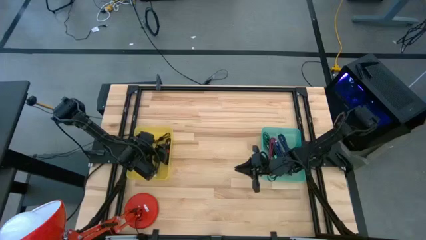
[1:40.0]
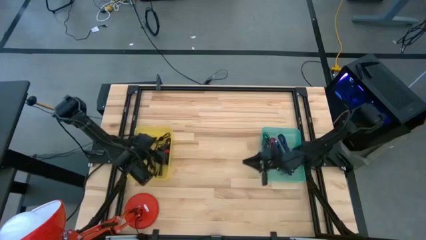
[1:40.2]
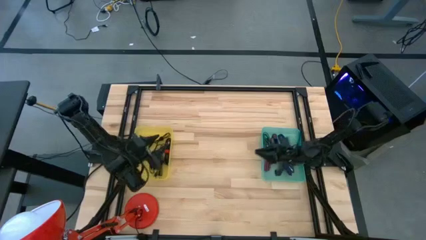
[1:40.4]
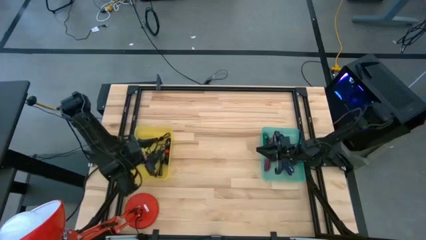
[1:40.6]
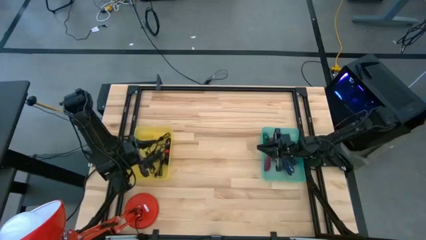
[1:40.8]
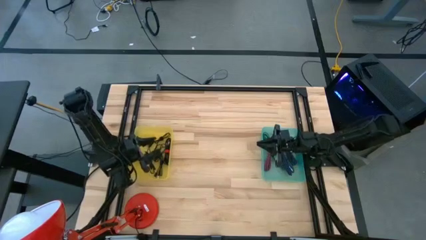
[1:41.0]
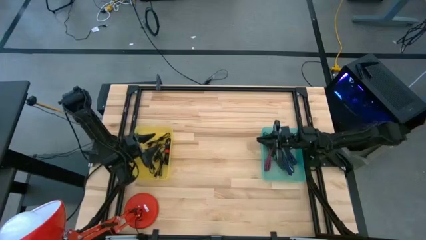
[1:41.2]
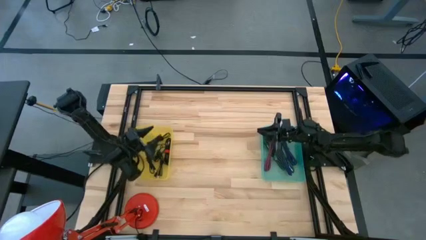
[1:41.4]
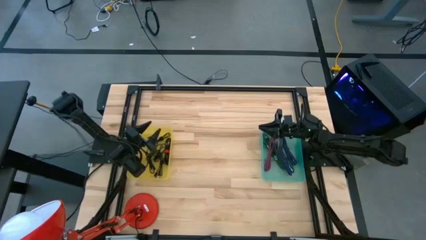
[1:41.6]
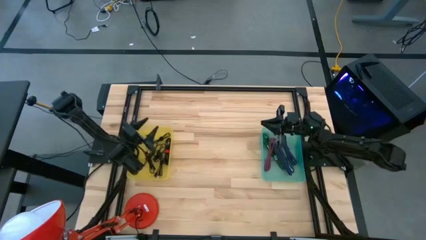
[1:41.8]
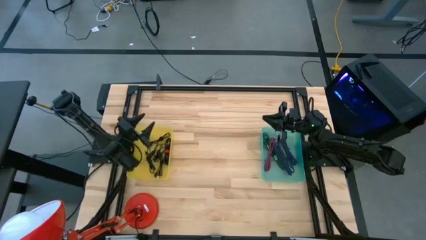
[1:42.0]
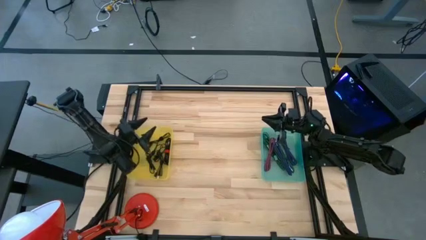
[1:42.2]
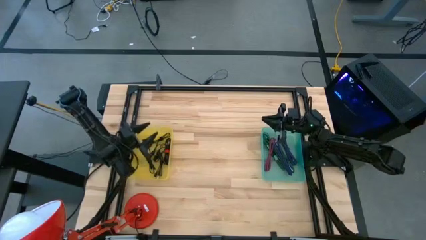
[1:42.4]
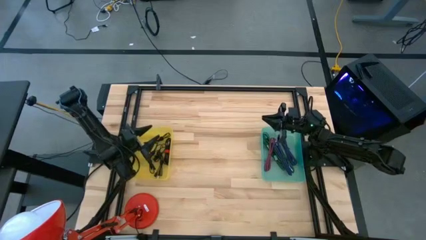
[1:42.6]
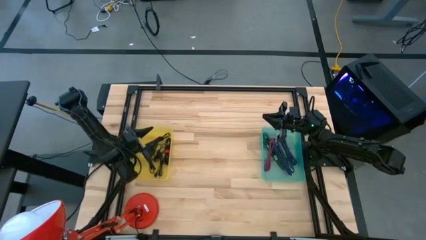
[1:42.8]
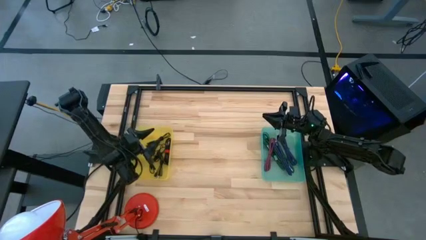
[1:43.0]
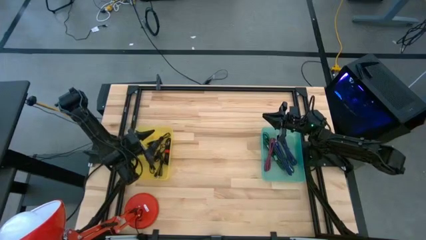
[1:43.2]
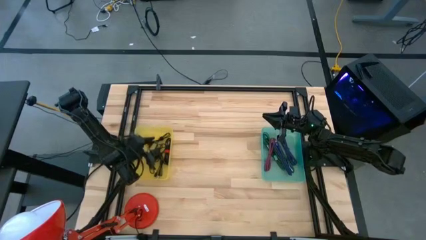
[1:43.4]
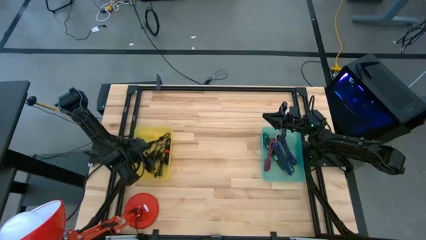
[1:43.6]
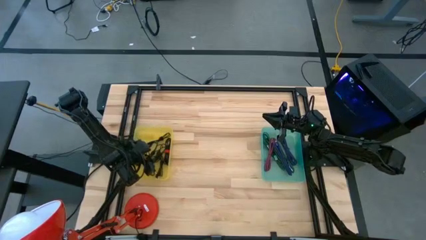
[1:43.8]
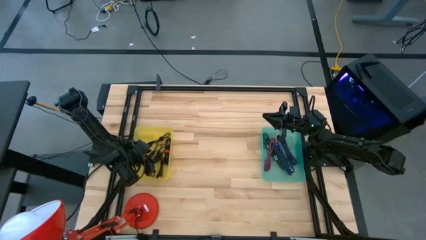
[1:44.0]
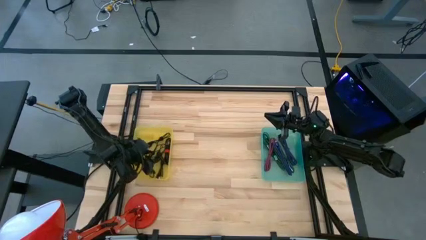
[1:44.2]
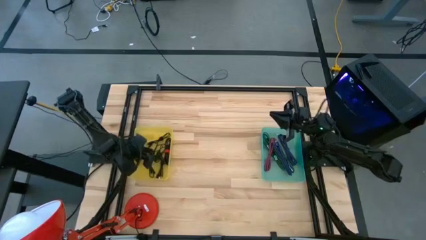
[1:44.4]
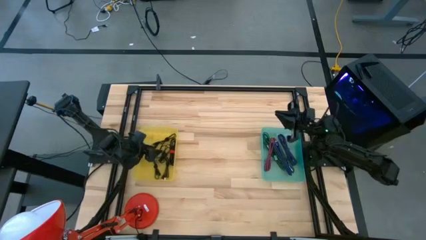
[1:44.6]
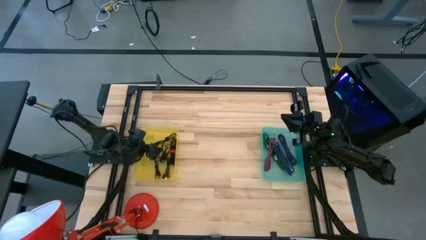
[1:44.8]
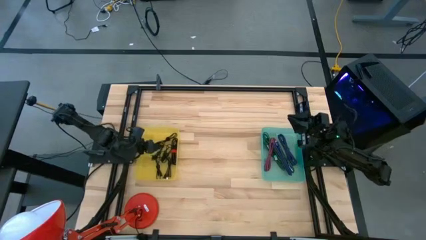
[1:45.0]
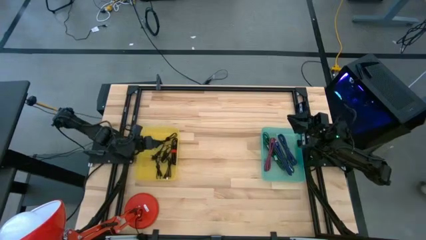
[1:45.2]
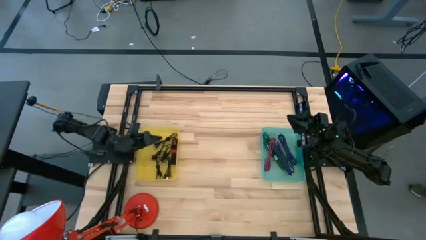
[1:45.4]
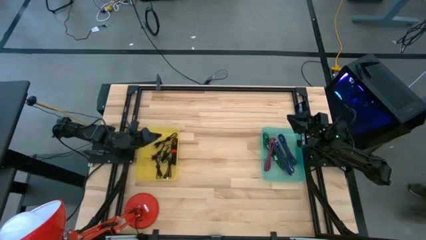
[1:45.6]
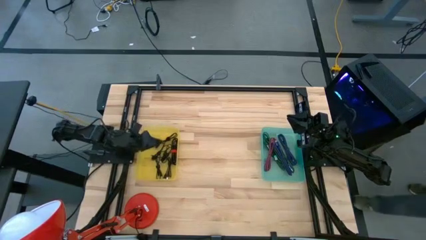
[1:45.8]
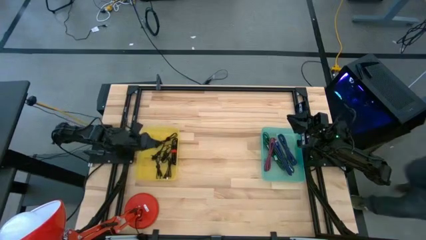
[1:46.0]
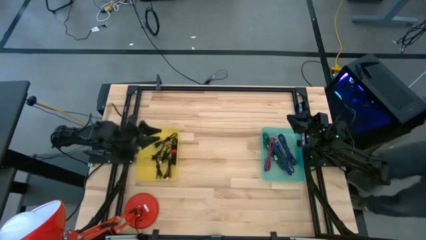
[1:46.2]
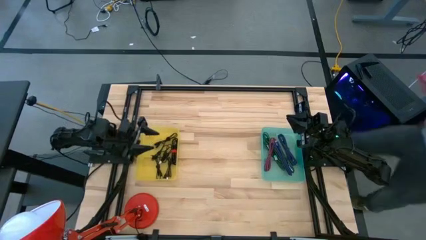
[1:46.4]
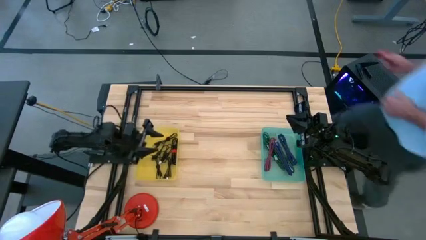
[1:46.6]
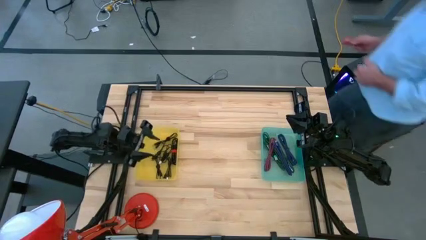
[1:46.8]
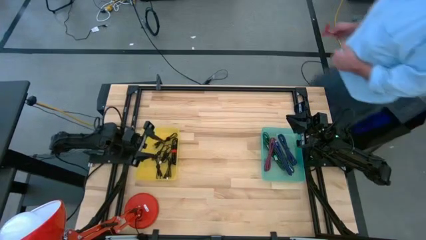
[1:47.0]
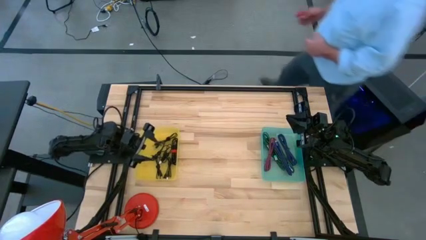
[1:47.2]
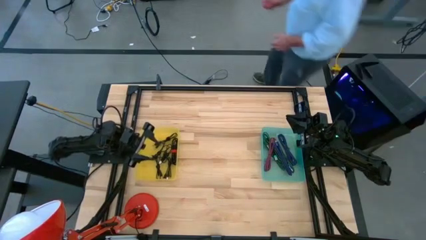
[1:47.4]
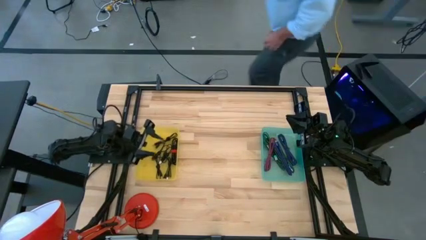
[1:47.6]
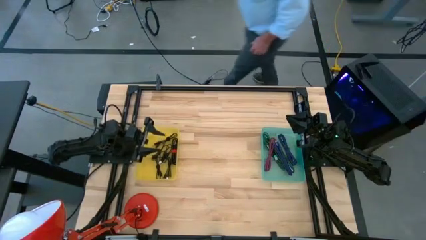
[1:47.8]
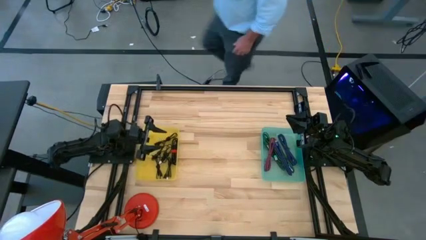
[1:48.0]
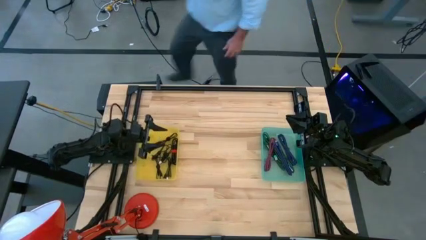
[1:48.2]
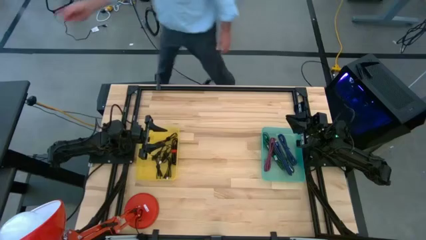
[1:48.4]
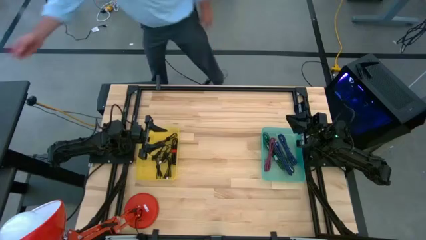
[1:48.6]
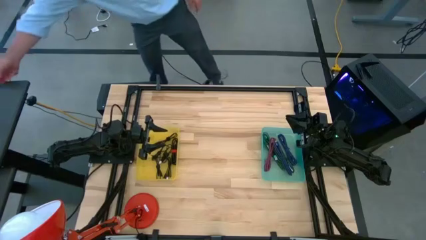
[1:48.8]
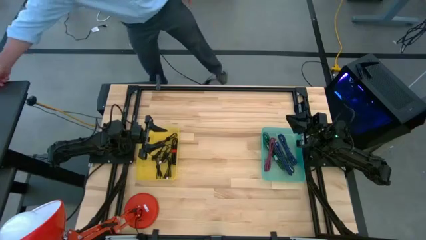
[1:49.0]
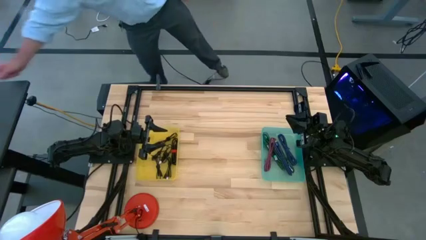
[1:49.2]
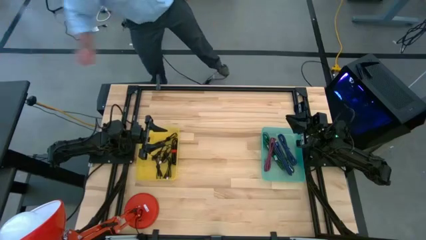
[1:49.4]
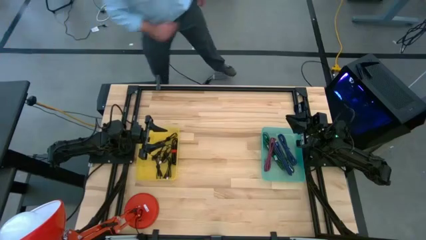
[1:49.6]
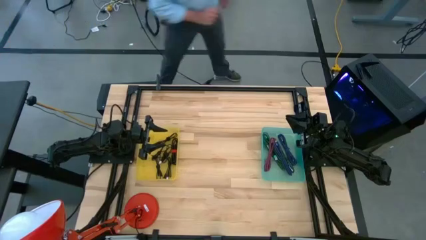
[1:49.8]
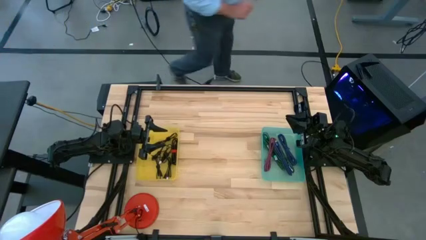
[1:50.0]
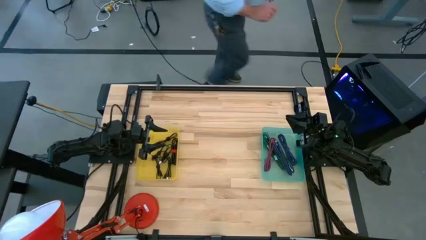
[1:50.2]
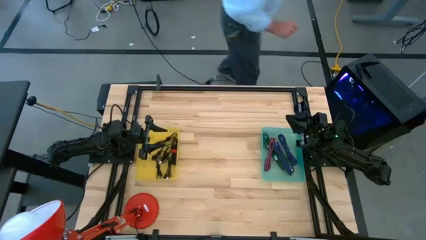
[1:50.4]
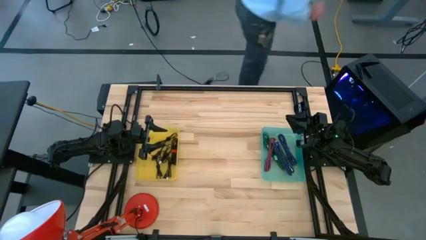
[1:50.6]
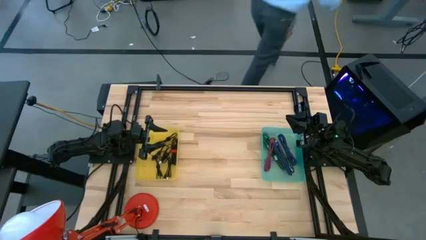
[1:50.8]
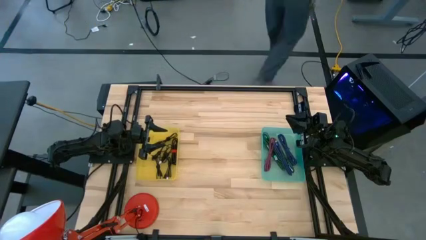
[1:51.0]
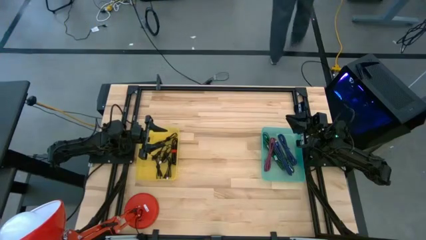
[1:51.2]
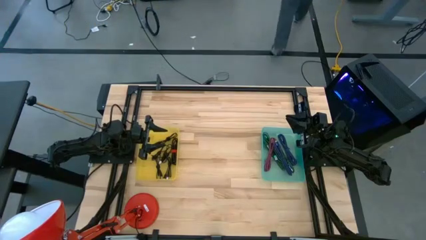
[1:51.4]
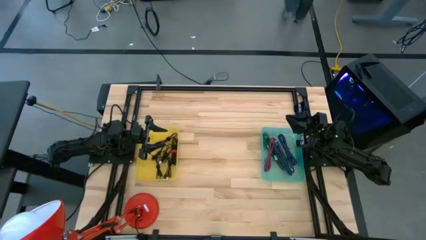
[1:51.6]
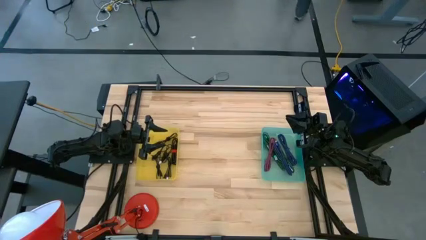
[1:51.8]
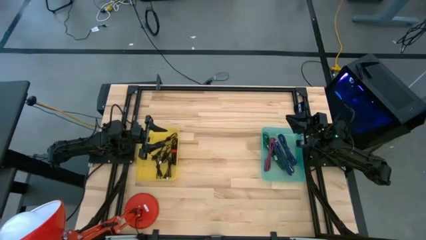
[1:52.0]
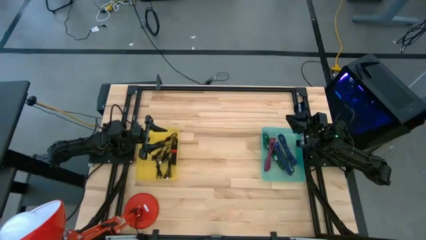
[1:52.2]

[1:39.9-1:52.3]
Task: Pick & Place USB Port
Return to Home Position

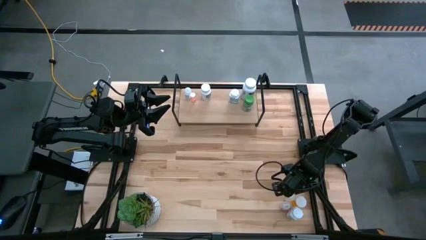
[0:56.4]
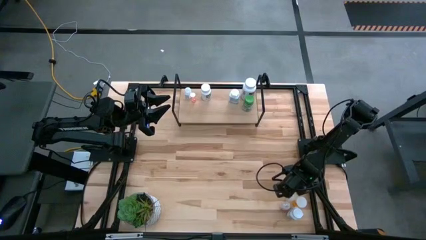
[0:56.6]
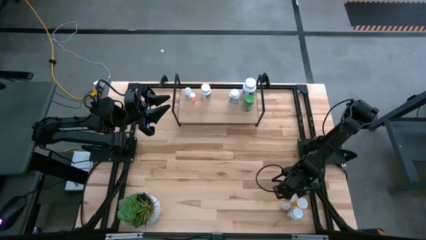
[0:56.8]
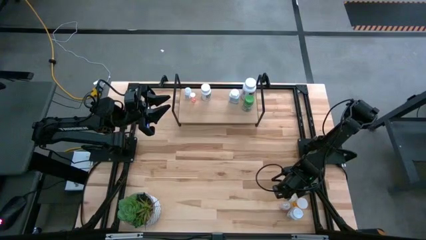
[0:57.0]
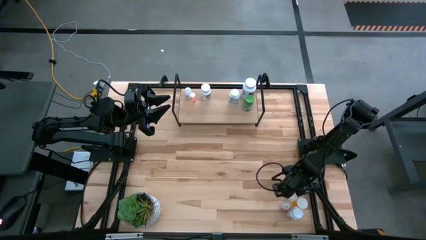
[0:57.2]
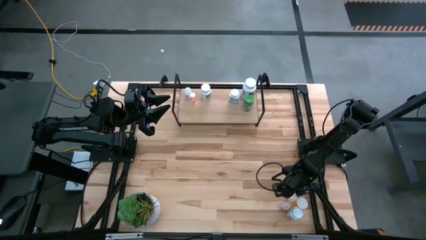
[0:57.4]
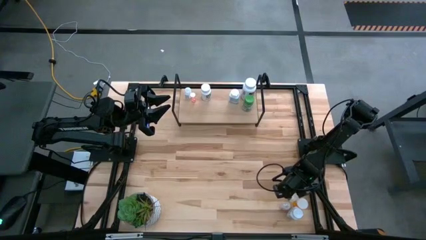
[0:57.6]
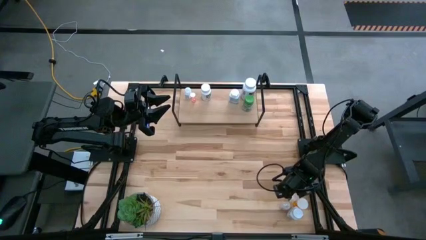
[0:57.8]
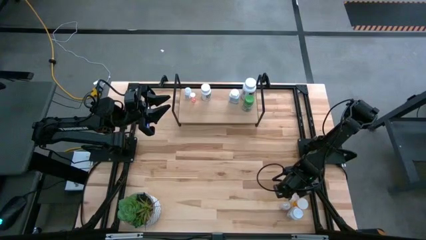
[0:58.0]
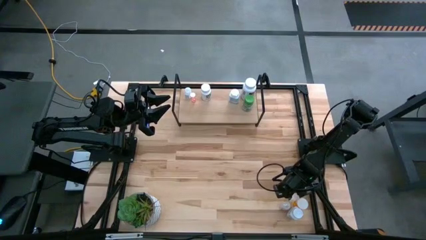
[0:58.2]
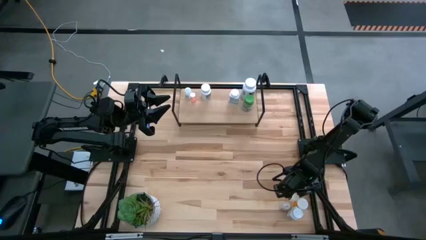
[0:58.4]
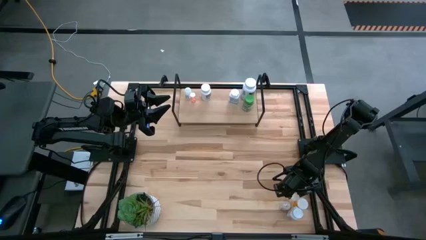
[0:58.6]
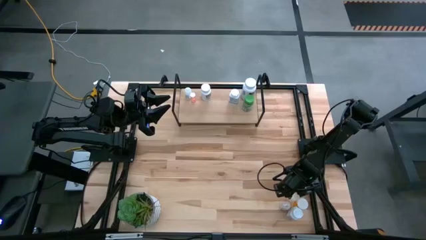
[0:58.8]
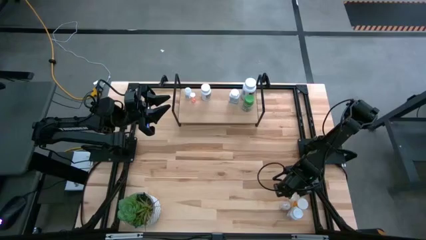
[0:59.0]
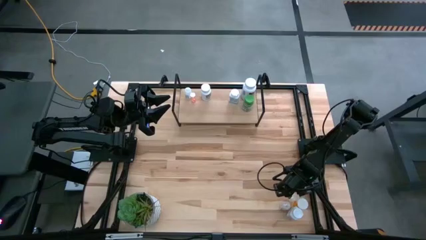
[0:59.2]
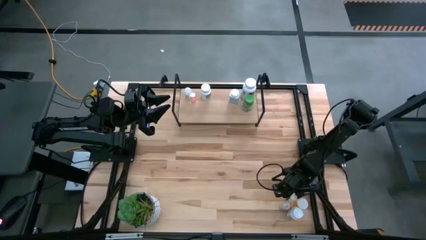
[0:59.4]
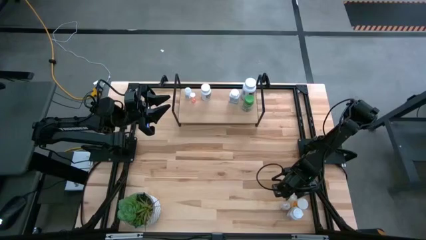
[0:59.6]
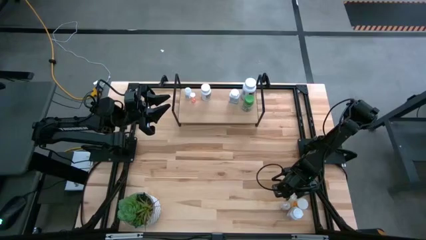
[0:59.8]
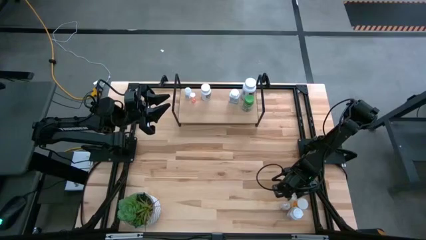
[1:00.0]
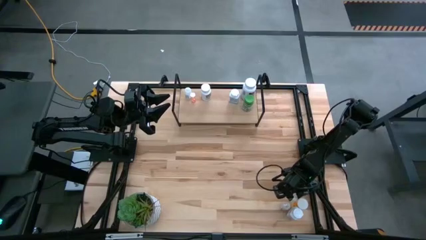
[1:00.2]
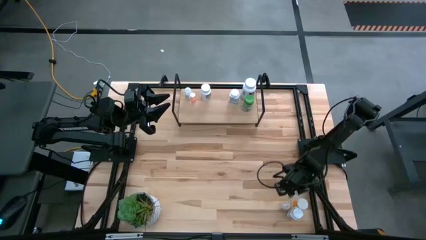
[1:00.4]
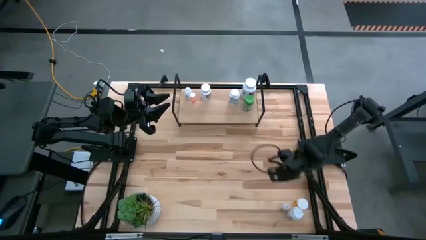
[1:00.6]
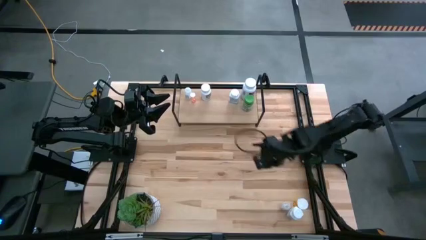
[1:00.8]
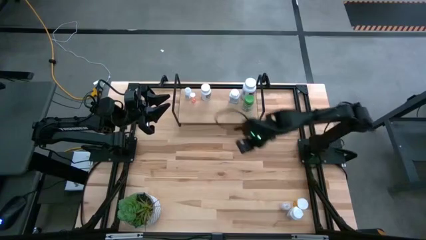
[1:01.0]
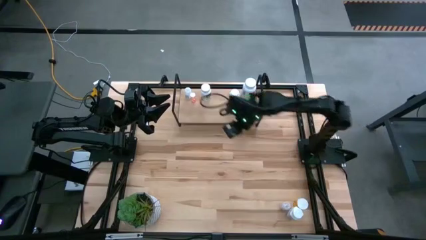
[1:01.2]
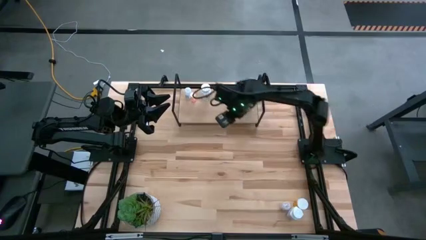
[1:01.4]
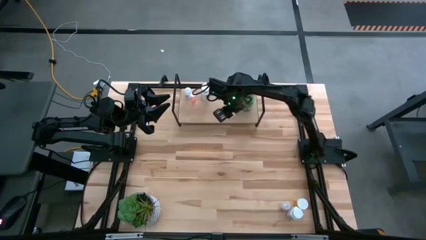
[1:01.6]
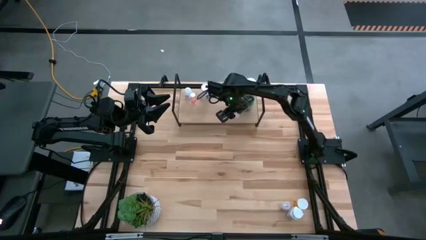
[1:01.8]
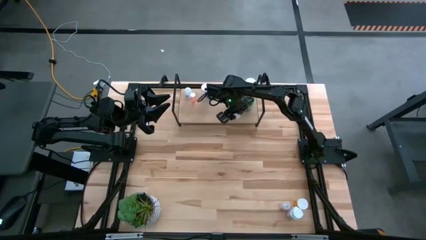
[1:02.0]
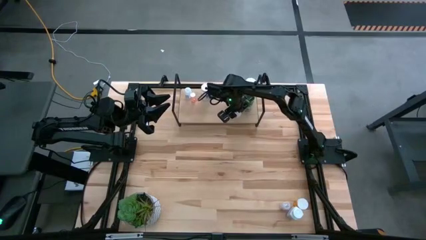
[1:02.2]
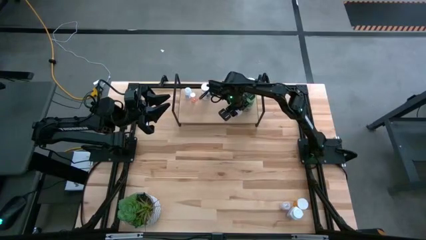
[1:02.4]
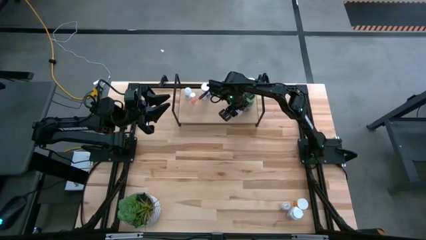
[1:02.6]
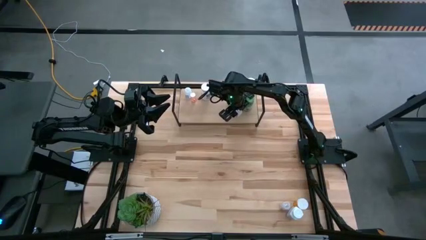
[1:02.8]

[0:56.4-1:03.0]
Task: Pick and place medicine bottles onto shelf by color
Put the transparent pill bottle on the shelf
